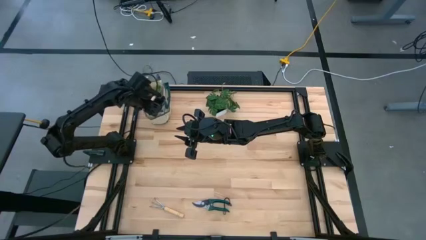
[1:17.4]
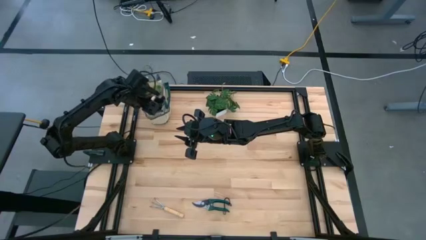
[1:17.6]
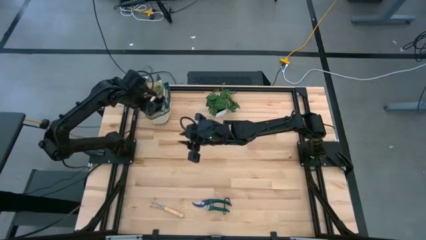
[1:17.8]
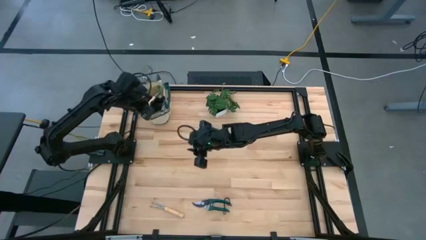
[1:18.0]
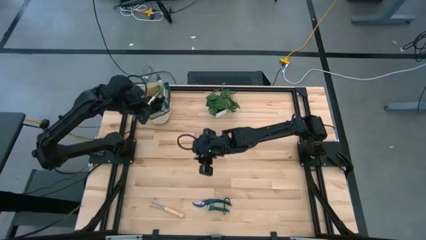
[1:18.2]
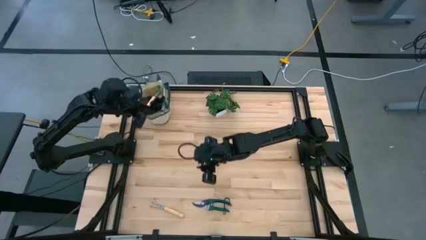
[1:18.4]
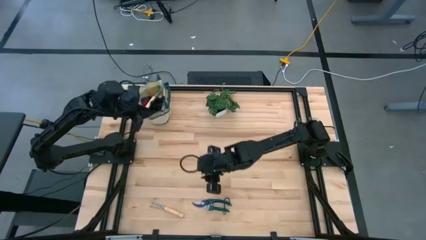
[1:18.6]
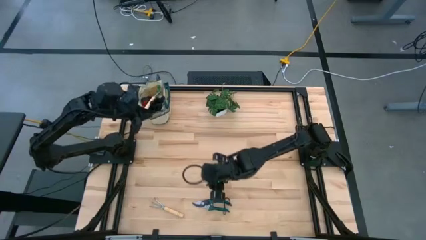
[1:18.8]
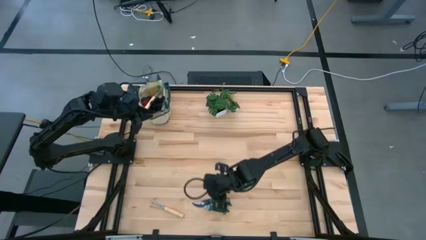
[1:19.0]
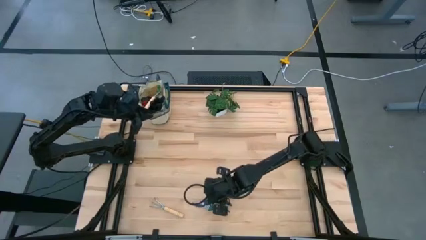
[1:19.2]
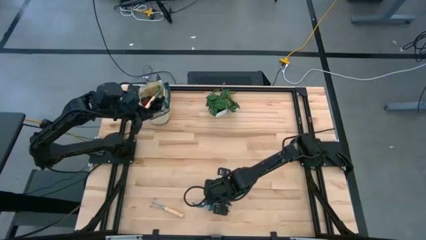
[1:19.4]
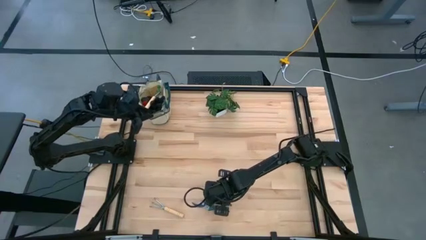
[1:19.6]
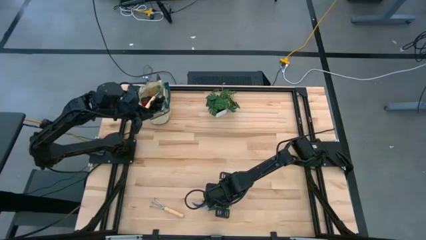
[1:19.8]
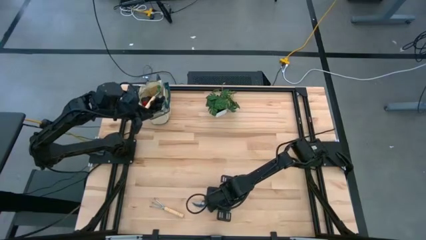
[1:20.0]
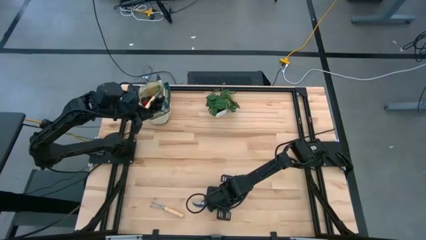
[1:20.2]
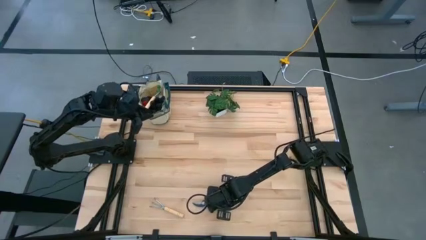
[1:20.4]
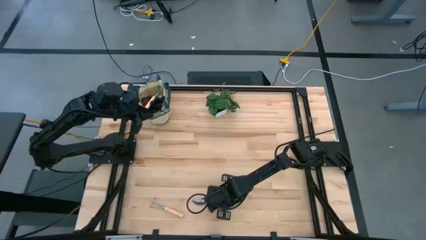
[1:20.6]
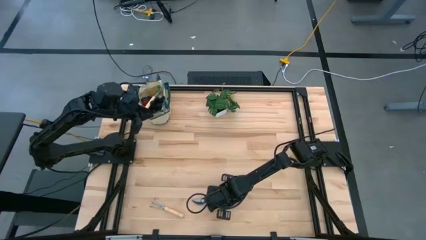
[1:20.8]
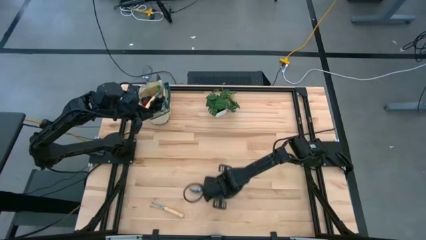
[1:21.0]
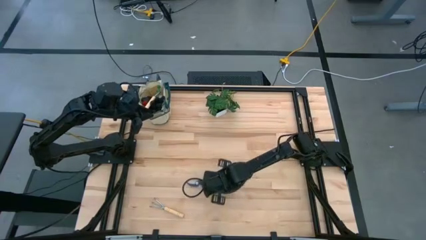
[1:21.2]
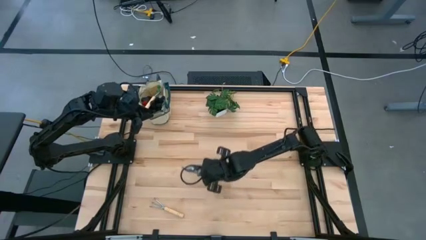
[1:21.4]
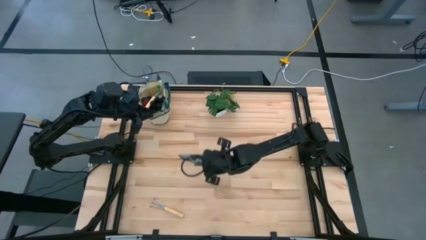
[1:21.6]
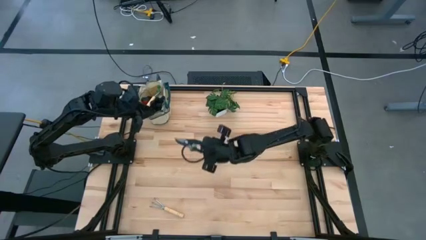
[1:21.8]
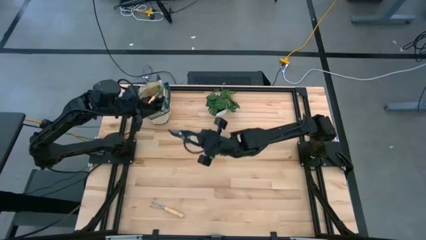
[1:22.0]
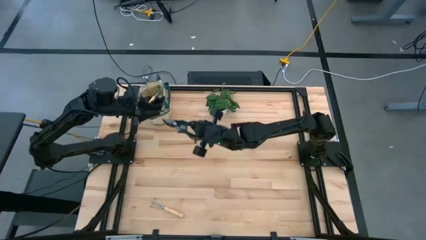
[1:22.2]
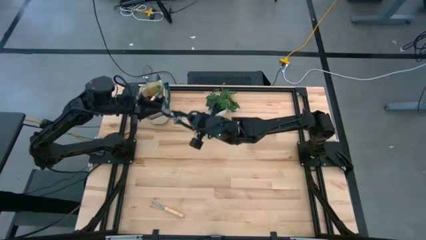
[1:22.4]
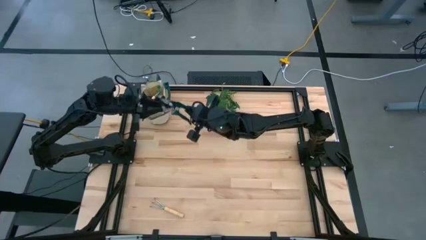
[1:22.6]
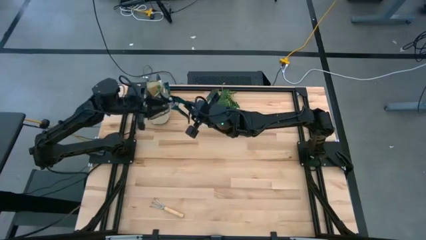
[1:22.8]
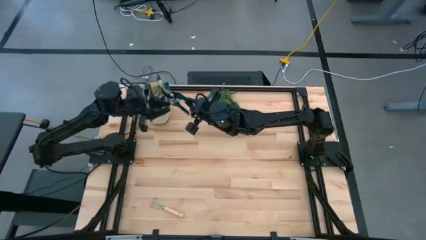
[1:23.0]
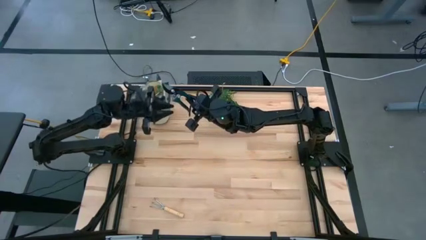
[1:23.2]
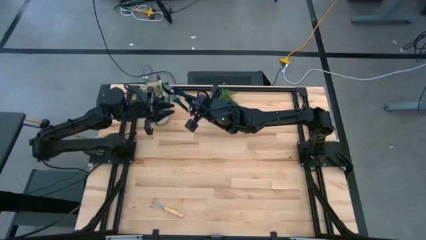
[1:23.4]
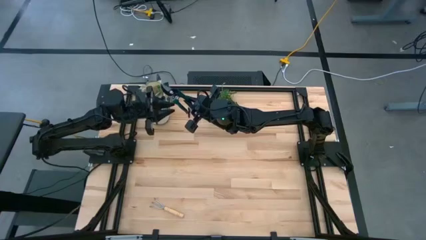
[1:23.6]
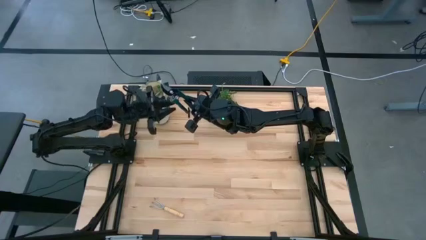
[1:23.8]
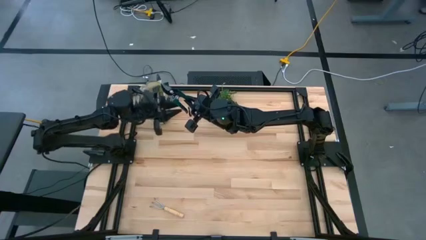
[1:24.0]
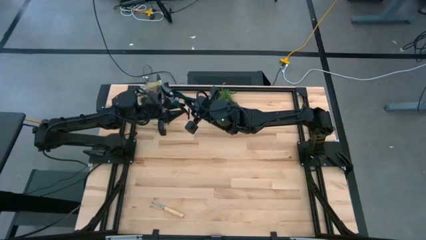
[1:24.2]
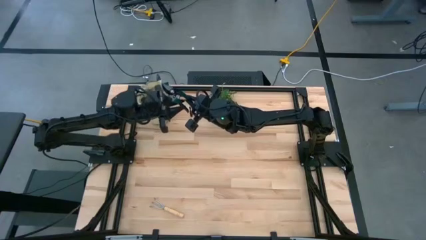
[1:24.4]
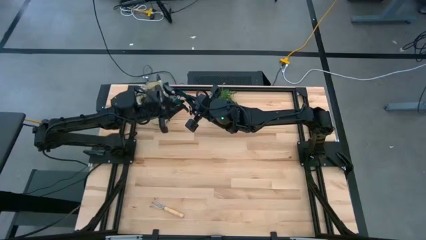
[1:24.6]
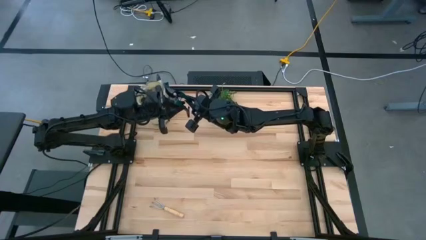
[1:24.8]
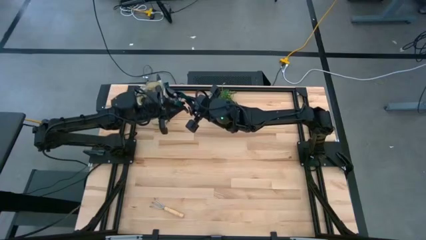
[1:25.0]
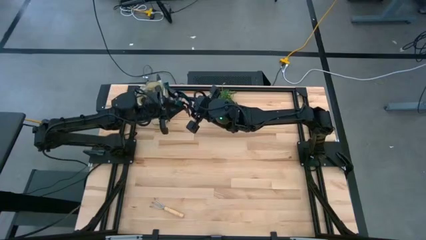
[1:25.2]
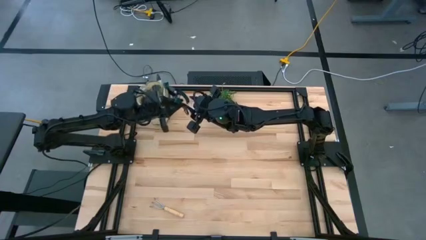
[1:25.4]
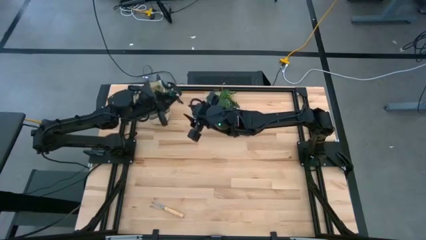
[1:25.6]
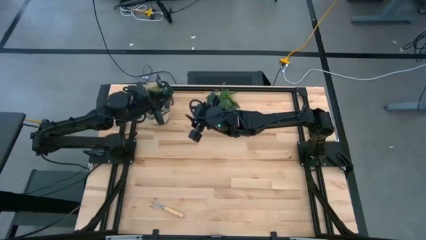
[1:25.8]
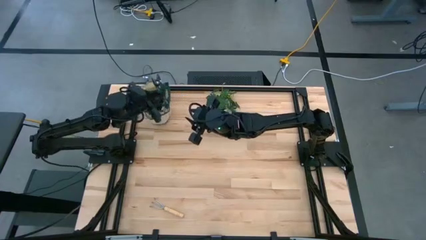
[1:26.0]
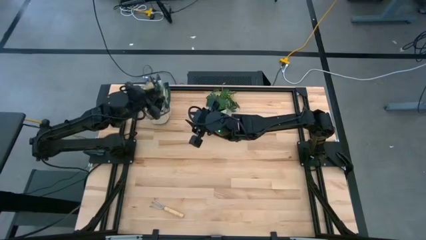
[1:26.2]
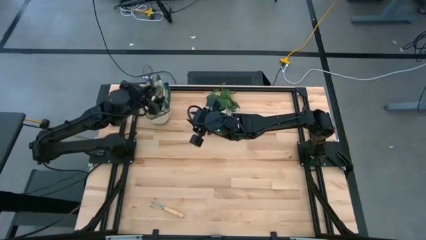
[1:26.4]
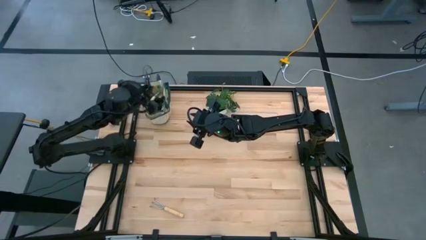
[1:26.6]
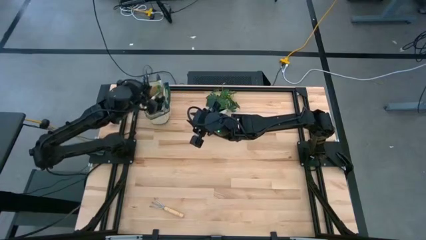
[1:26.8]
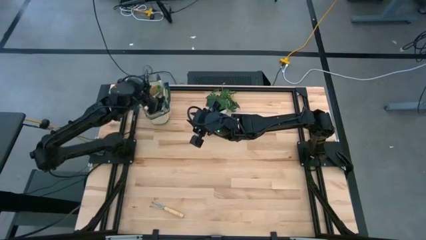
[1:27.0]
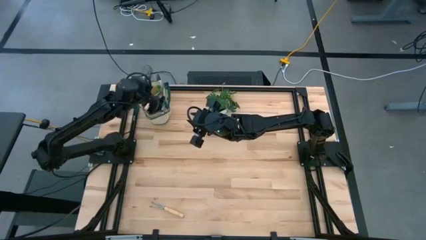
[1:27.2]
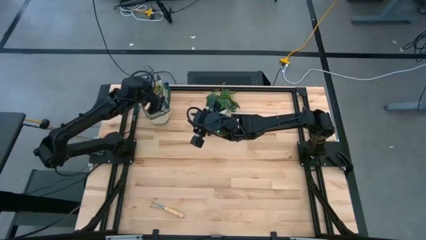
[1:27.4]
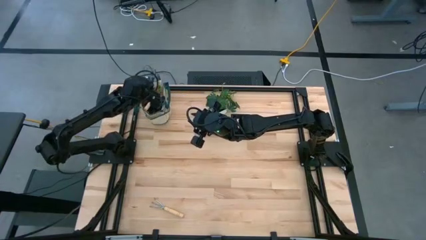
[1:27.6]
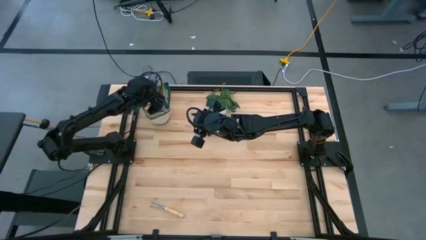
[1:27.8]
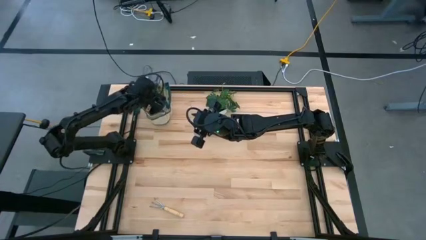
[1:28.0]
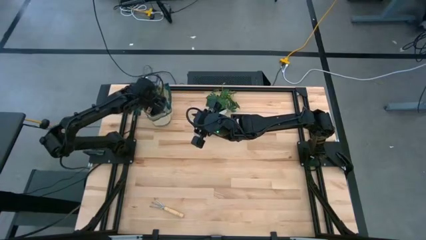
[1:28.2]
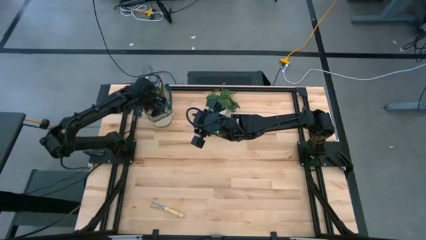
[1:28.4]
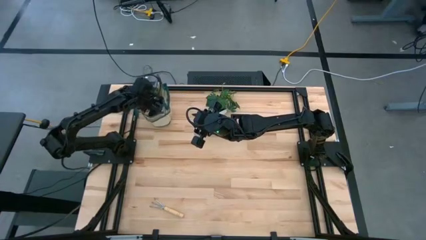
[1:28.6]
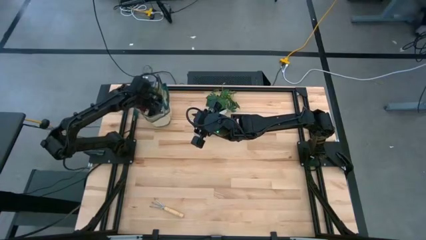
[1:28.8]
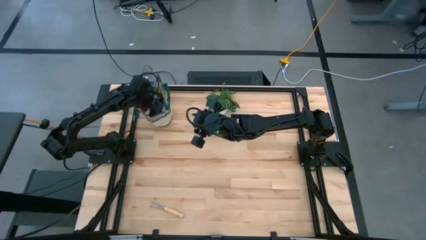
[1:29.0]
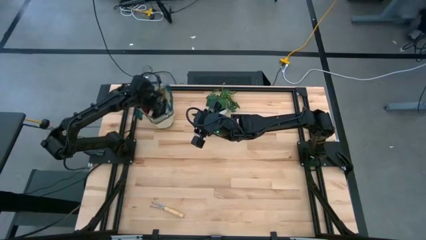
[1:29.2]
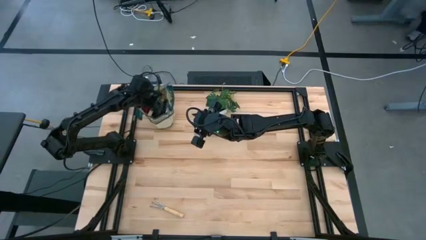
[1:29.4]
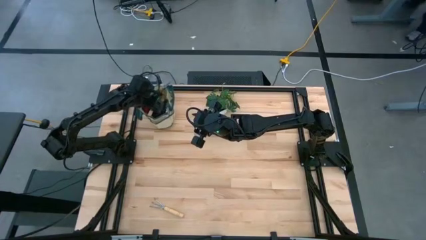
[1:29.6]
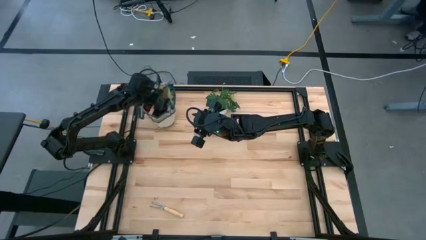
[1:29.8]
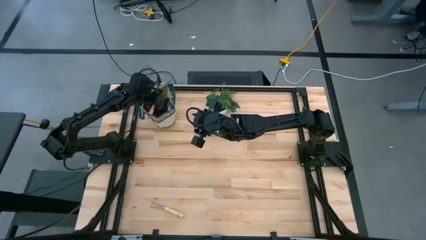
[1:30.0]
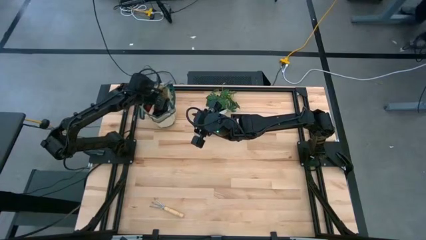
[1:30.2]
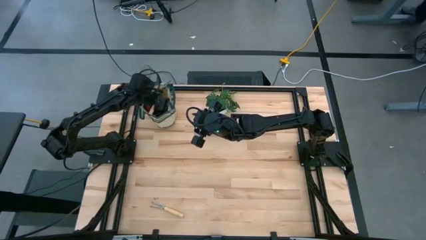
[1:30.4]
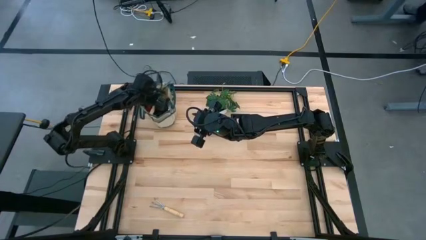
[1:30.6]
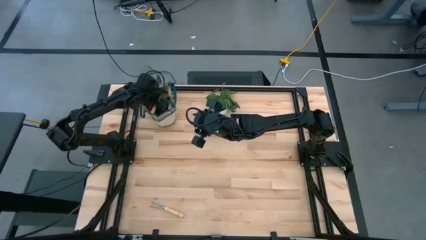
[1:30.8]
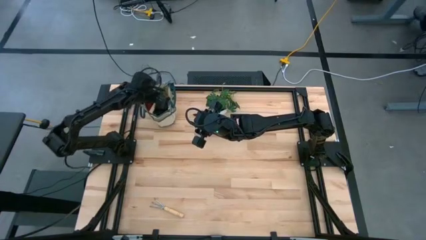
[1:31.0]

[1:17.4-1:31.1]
Task: Pick & Place Garden tools in Gardening bag
Put the dark green shears into the green gardening bag

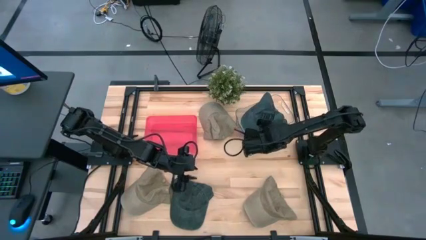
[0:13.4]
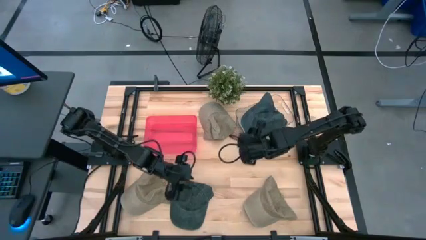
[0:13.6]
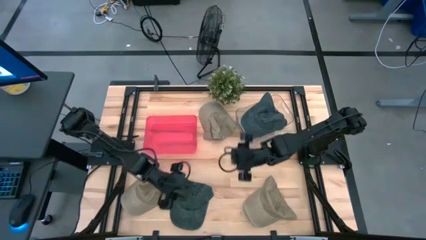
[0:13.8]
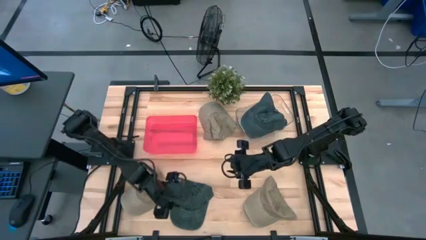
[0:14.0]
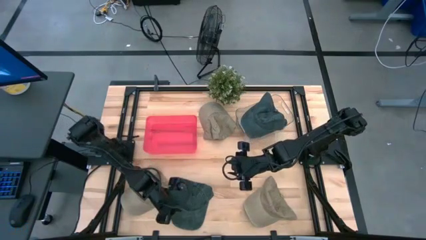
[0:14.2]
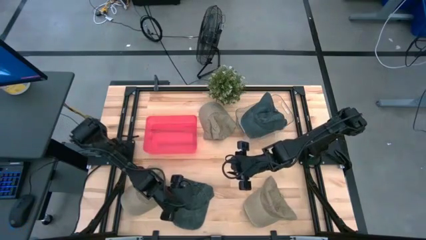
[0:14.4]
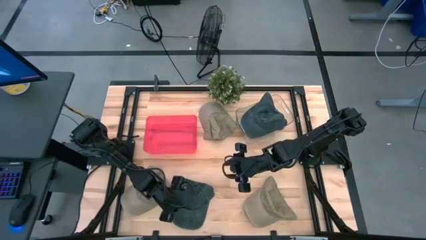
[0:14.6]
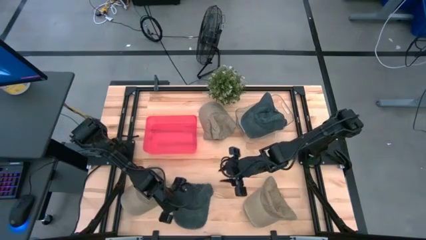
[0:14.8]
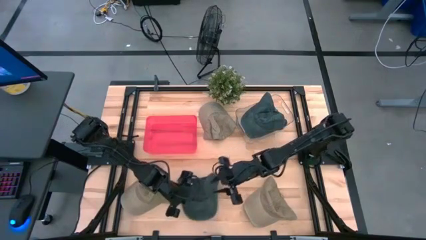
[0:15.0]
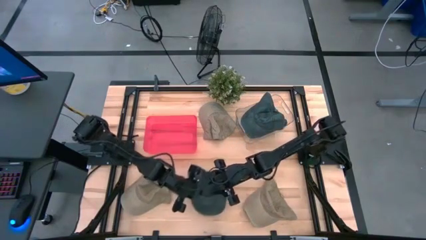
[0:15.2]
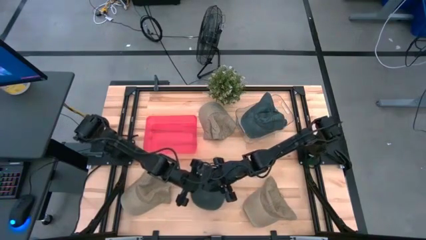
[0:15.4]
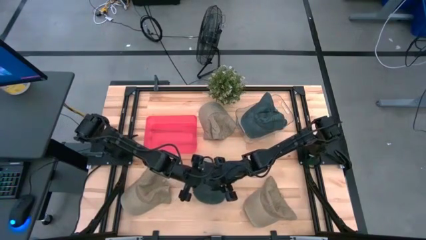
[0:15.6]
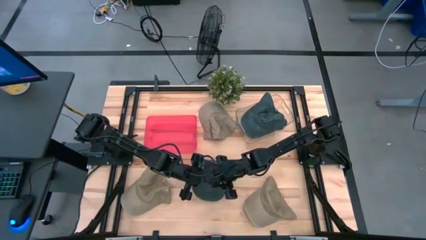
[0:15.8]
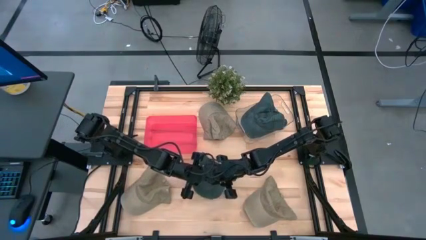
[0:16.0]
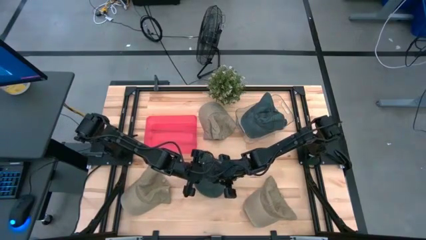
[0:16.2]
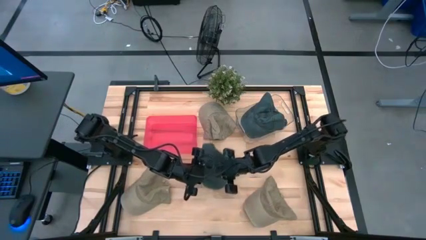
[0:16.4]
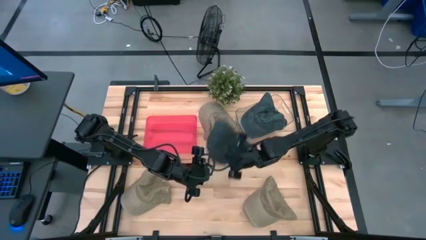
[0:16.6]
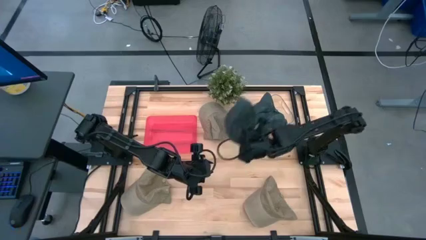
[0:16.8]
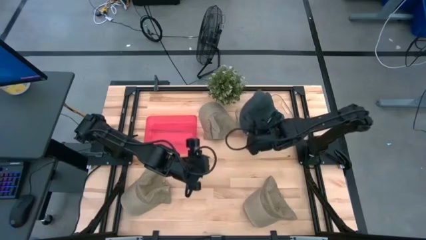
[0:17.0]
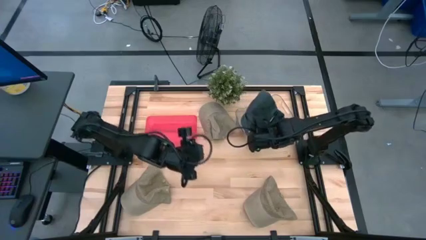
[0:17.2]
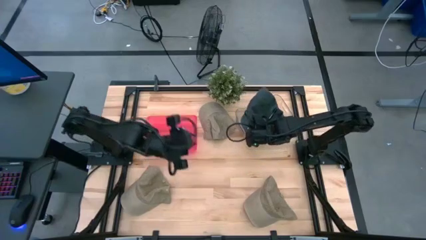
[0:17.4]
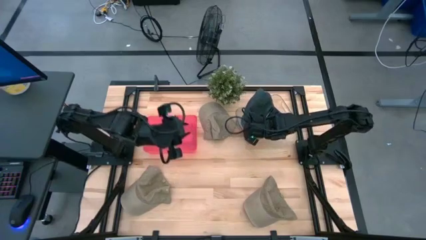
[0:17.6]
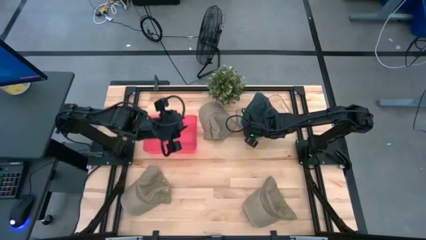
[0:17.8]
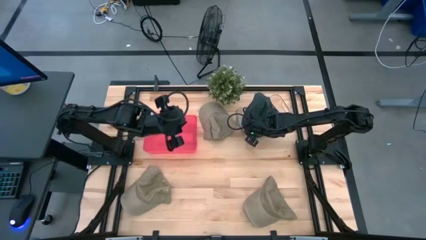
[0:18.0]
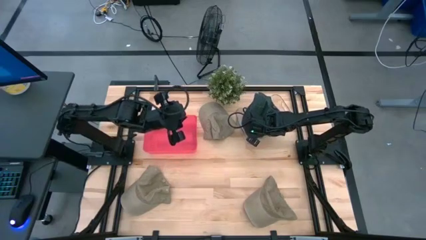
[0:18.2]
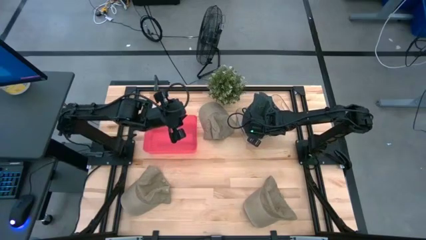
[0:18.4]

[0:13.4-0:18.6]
Task: Pick & Place hat
Put the black cap into the transparent bin
